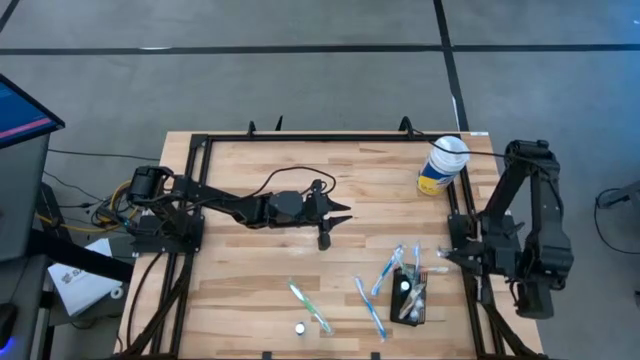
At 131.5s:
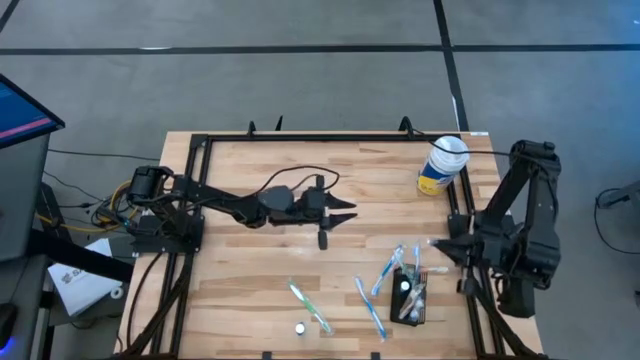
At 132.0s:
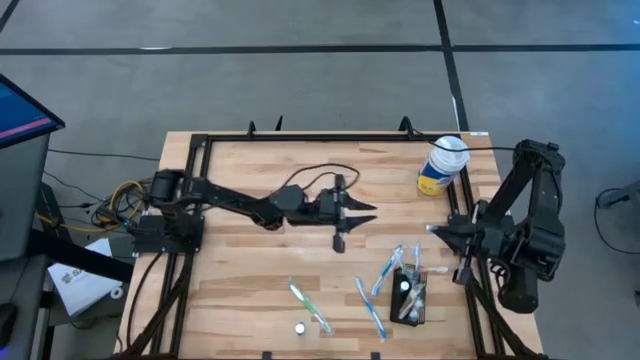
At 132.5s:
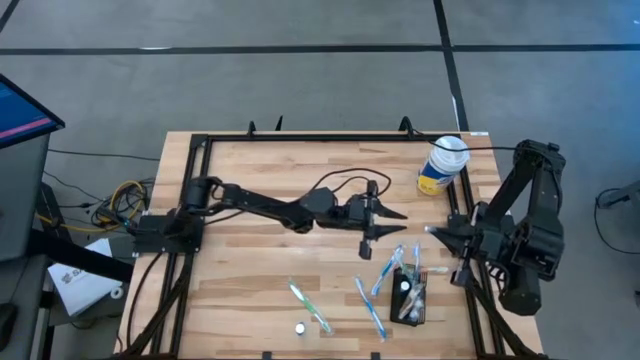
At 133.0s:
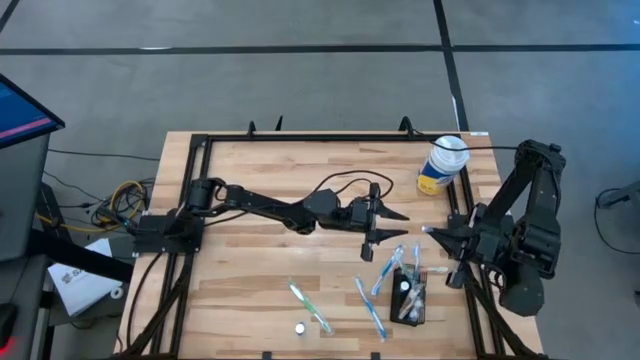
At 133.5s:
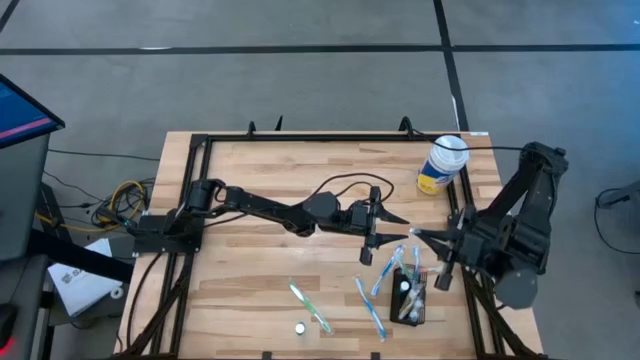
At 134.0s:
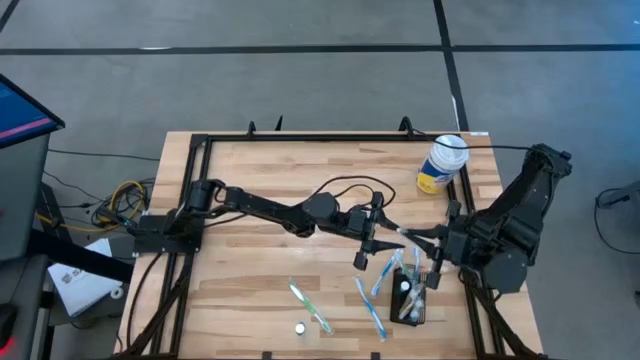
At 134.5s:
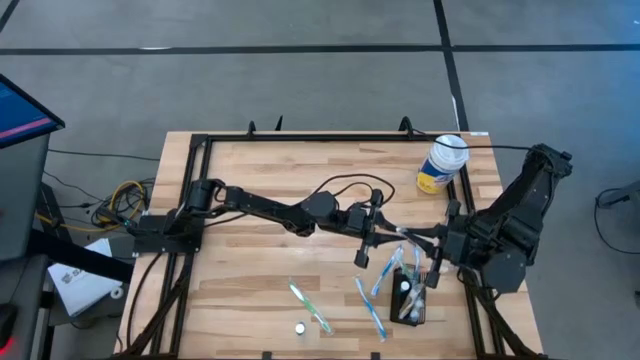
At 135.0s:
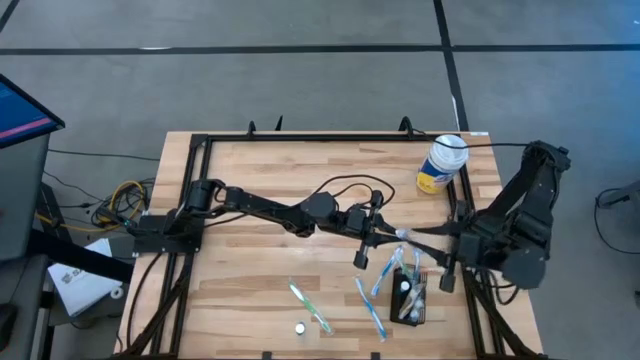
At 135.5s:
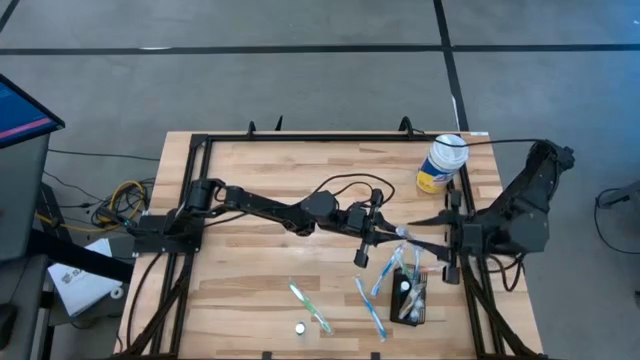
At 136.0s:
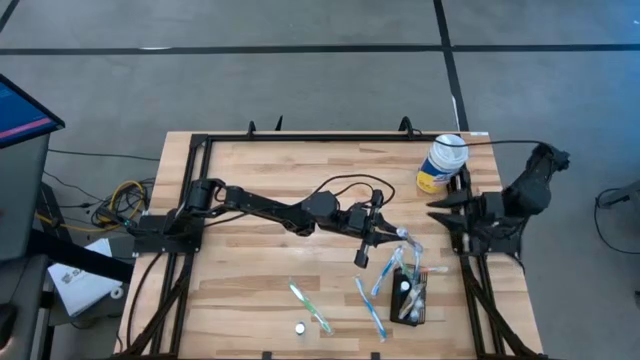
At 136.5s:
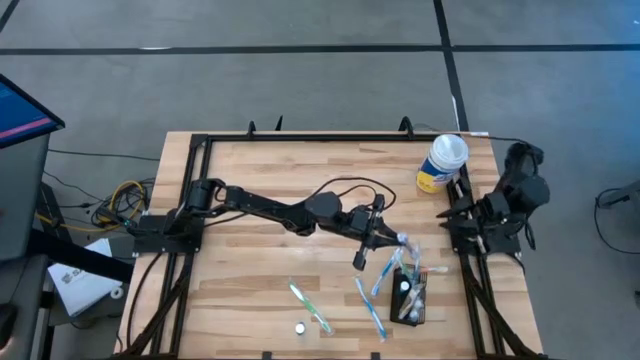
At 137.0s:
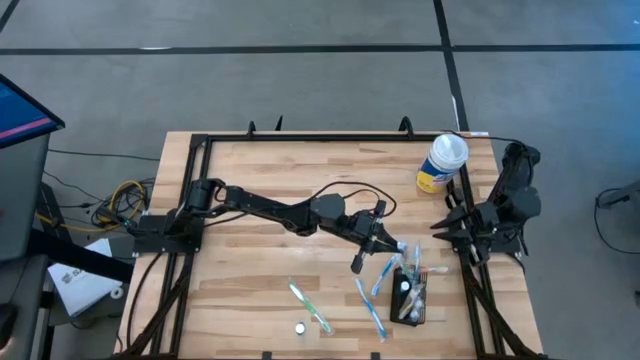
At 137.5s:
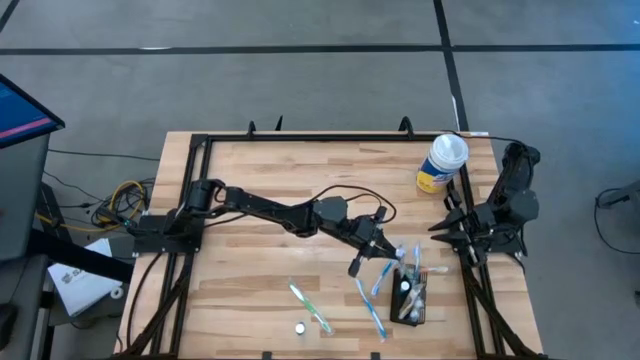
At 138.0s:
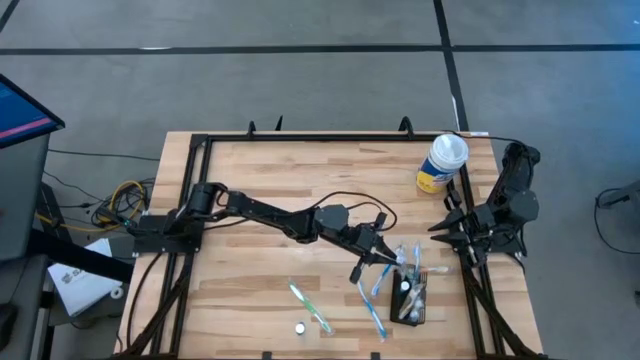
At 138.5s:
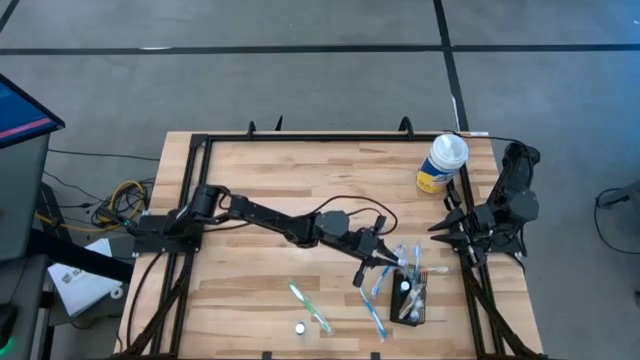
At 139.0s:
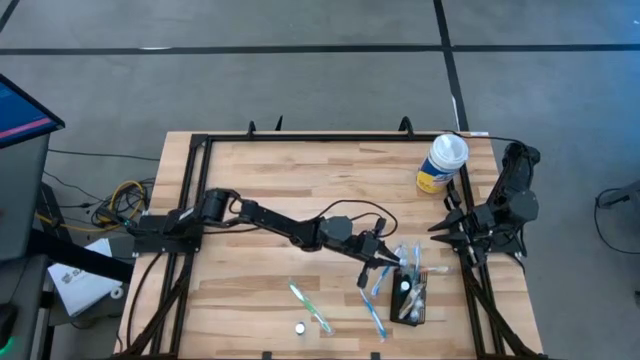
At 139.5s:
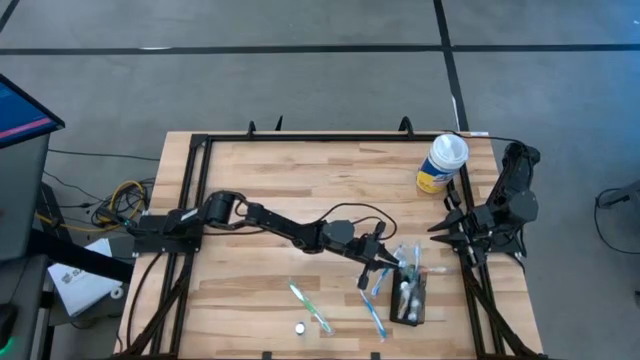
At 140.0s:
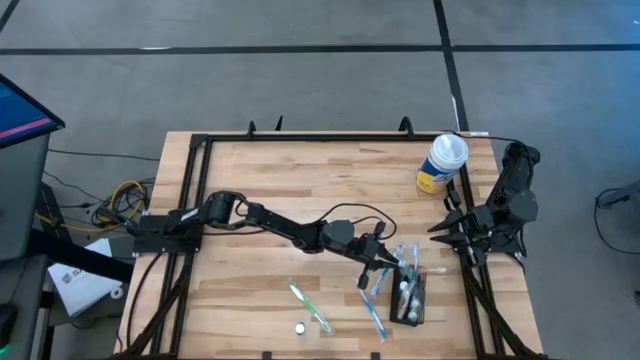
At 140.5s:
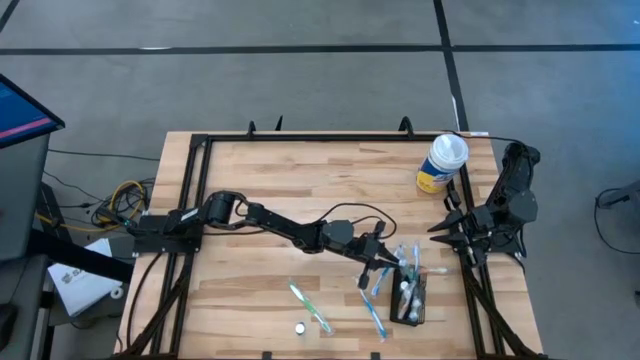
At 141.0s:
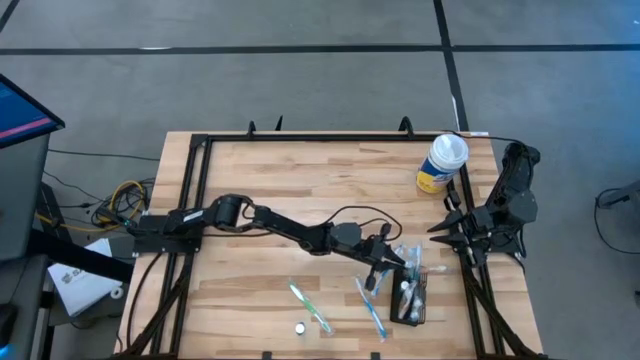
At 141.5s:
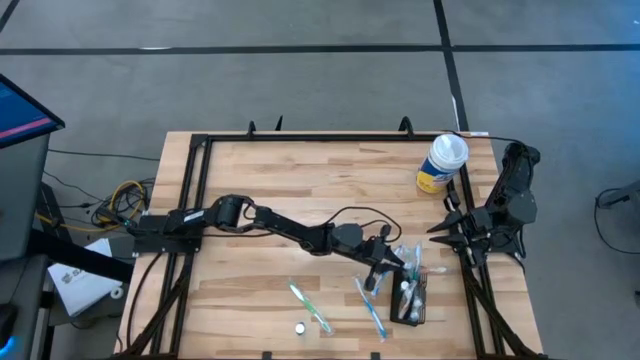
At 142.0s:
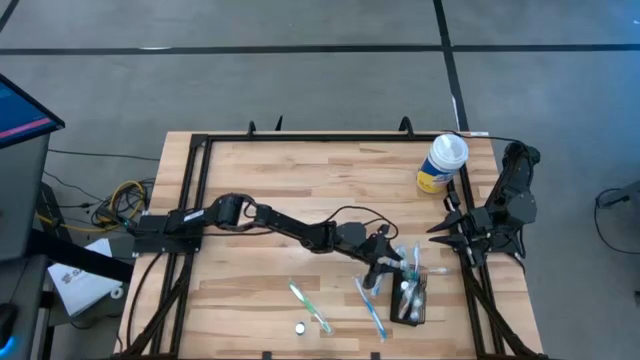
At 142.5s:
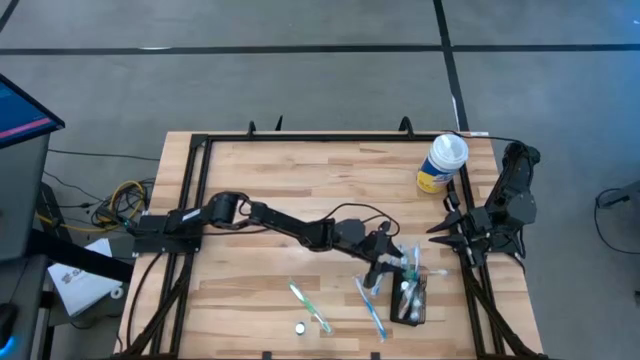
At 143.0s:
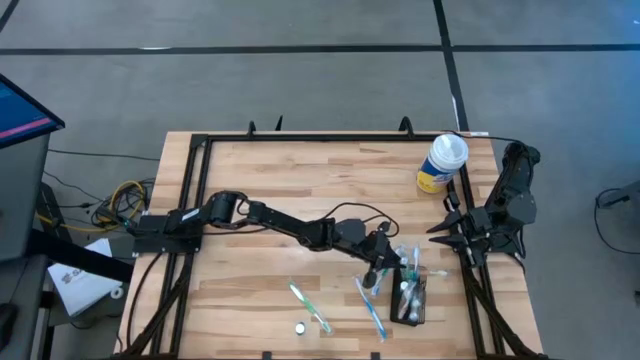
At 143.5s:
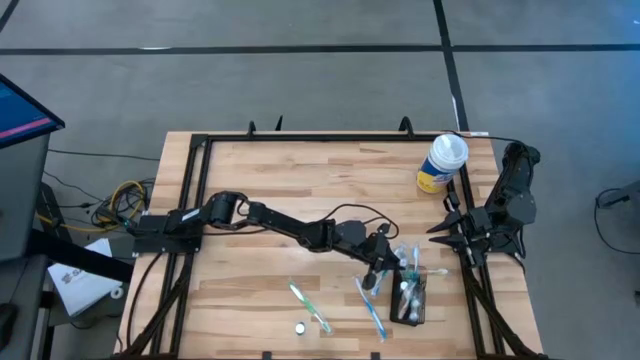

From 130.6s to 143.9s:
Task: Pick & Place toothbrushing station
Put the purple toothbrush into the black wire organizer

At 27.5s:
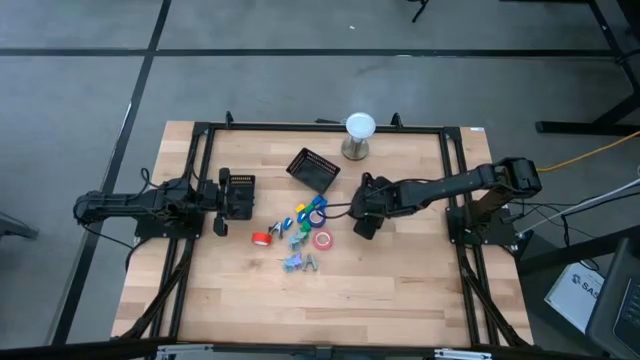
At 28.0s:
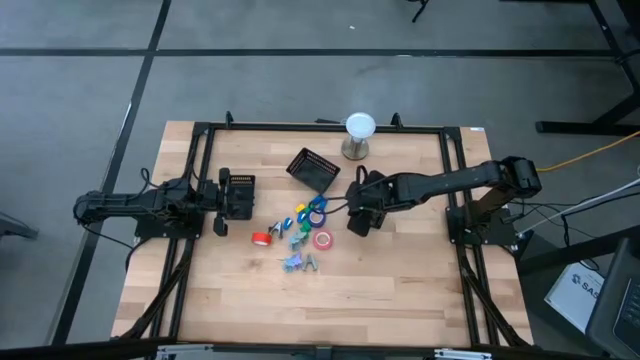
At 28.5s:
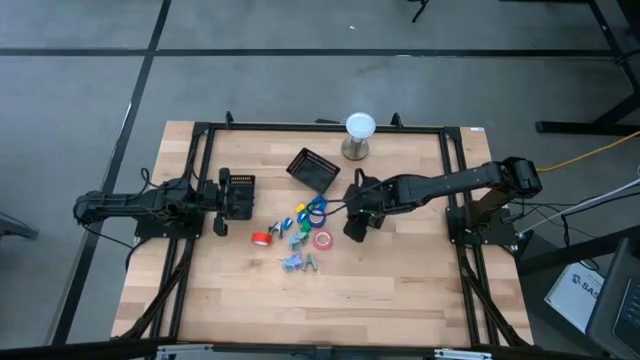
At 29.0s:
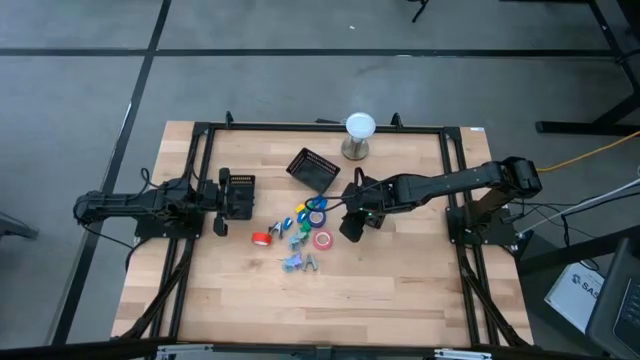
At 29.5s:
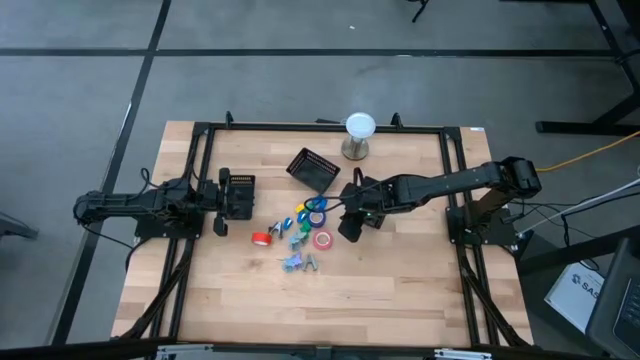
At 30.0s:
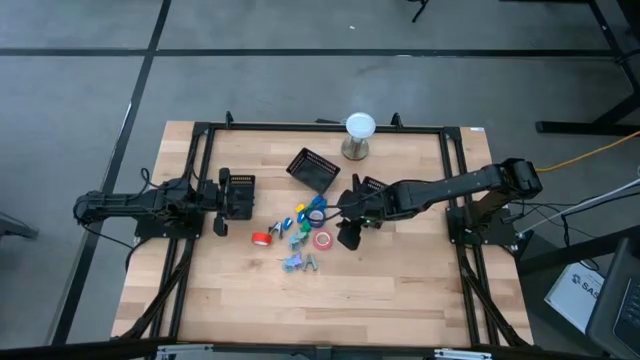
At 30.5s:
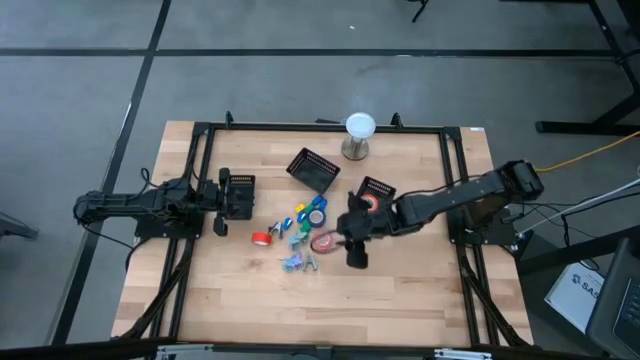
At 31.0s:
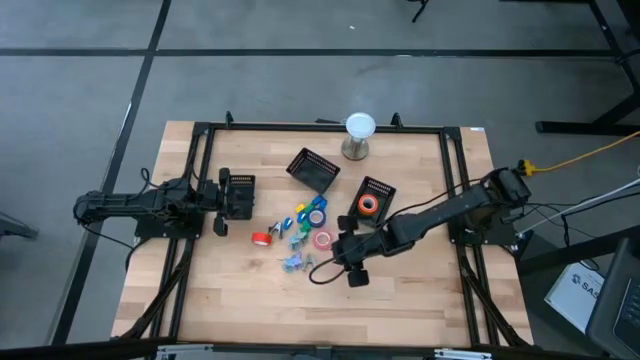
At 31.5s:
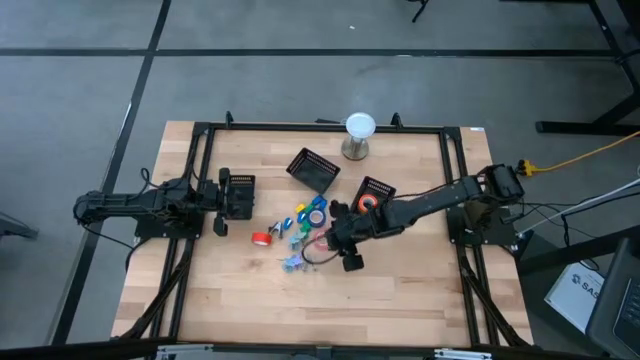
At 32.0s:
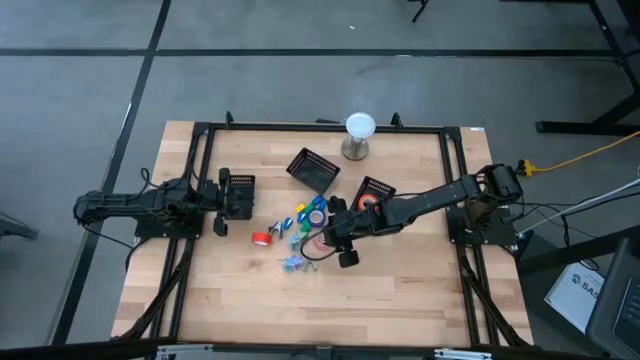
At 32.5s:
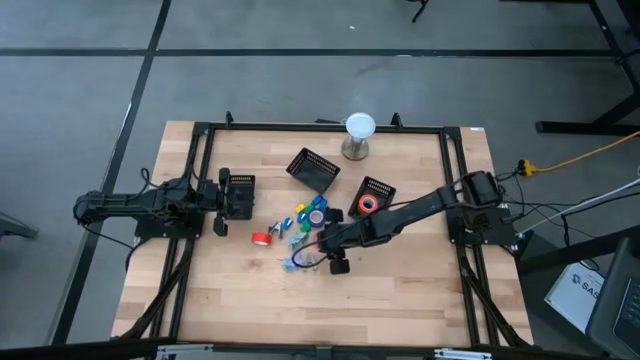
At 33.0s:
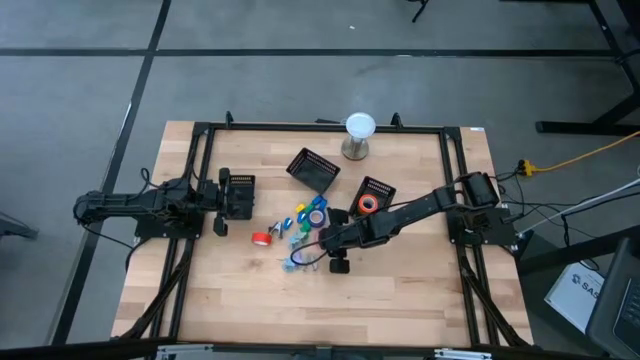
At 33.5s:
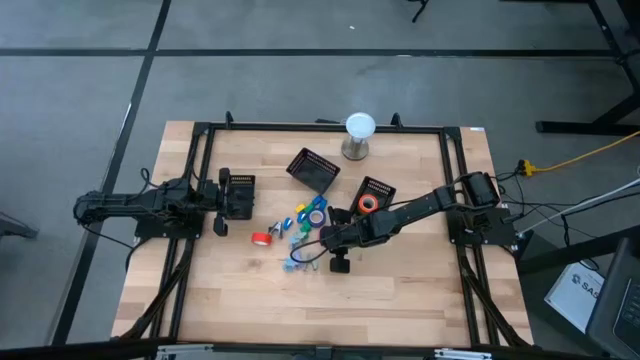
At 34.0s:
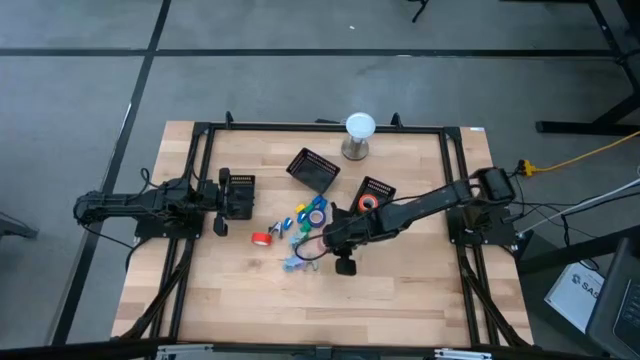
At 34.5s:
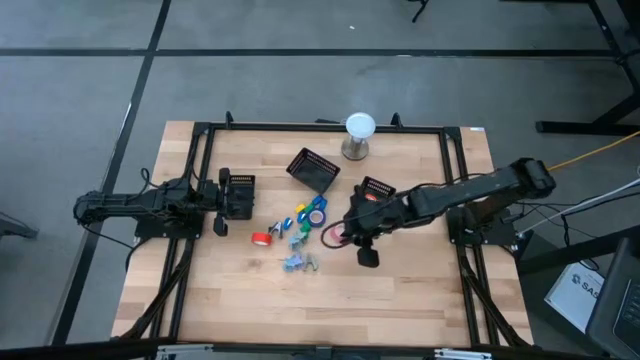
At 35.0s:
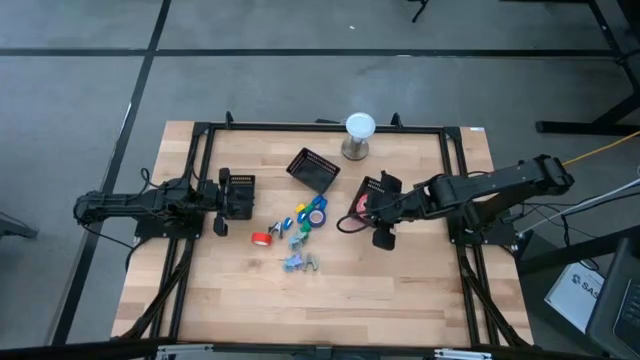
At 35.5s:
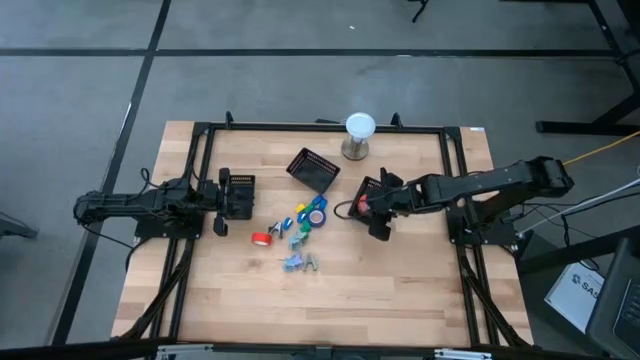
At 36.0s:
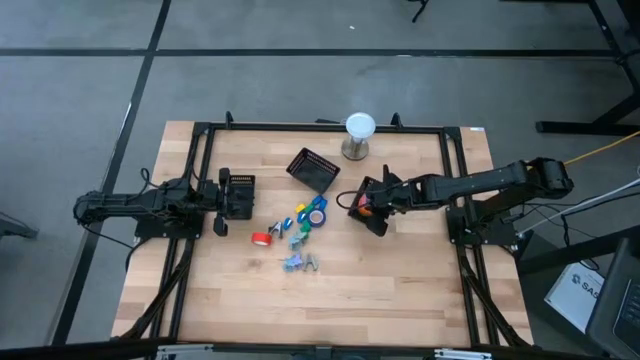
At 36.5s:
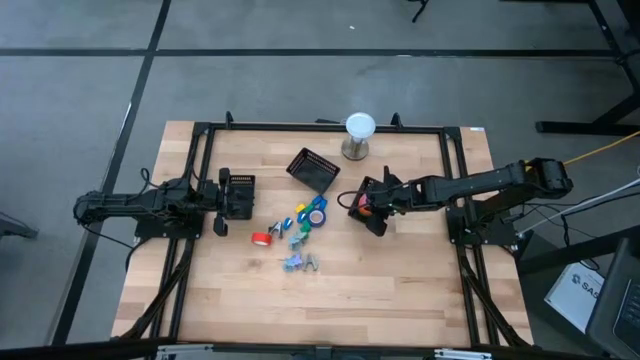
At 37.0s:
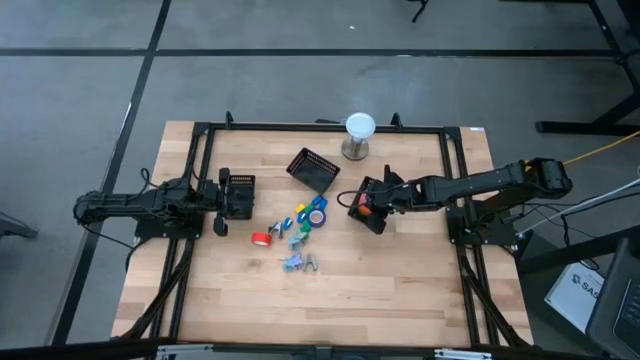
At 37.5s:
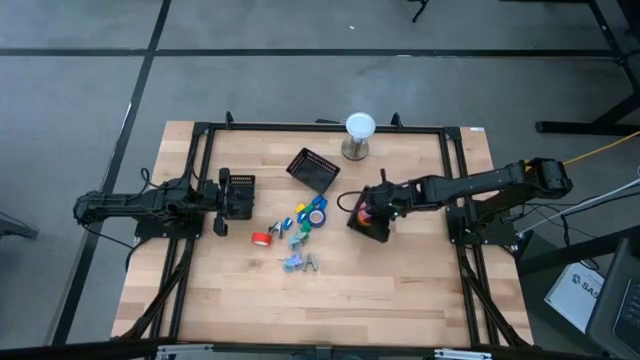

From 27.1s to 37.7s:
Task: Pick and place Stapler, Stapler remover, tape
Put the pink tape into the right black bin
